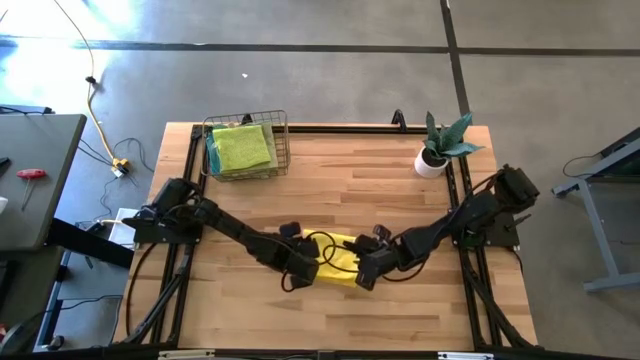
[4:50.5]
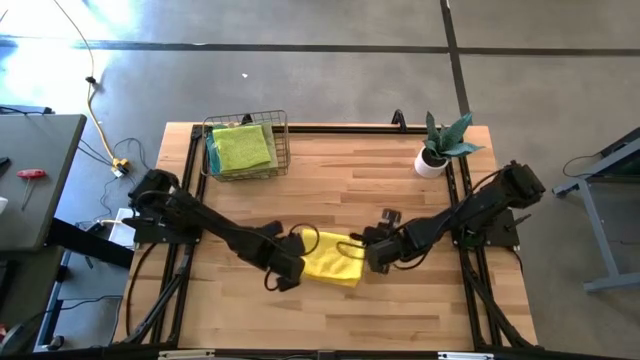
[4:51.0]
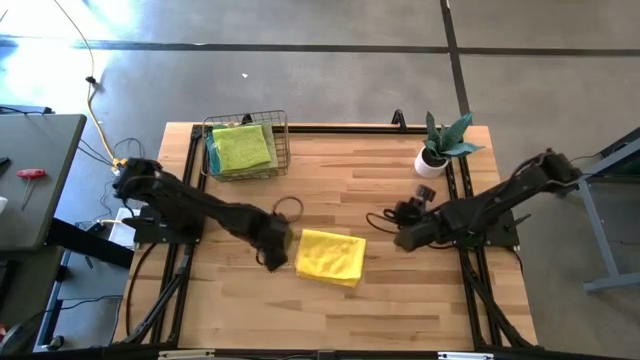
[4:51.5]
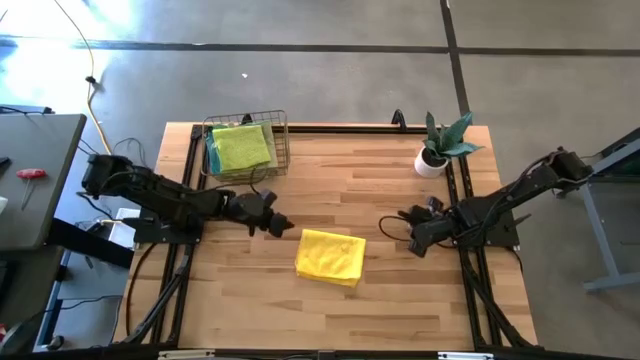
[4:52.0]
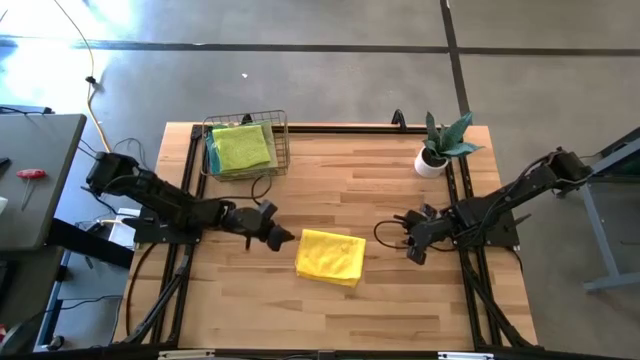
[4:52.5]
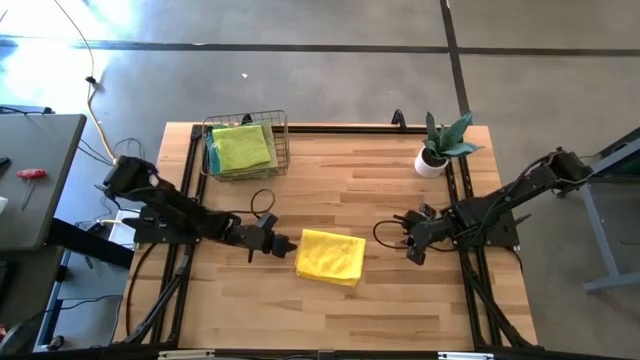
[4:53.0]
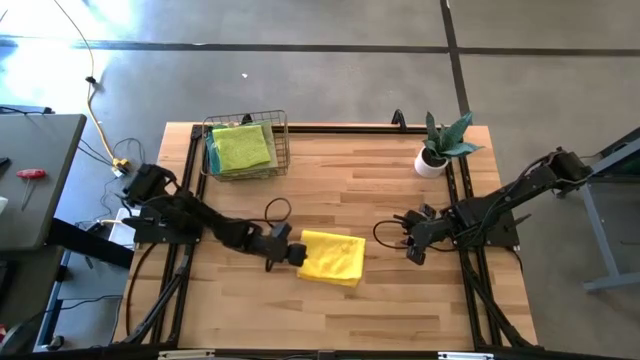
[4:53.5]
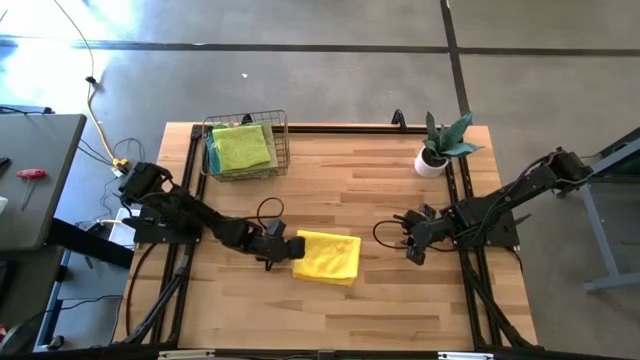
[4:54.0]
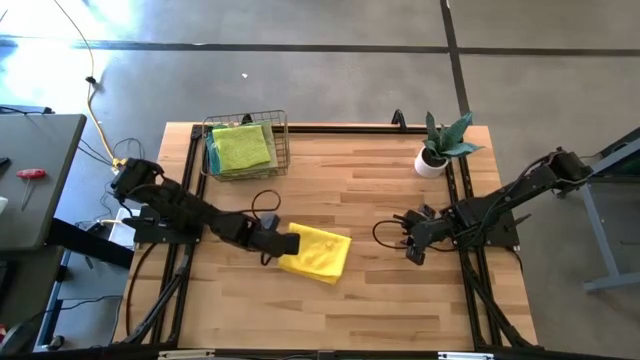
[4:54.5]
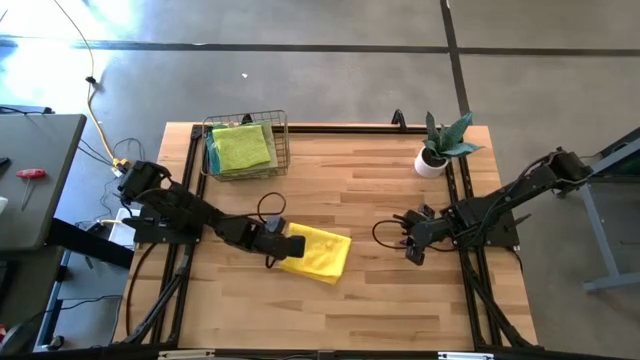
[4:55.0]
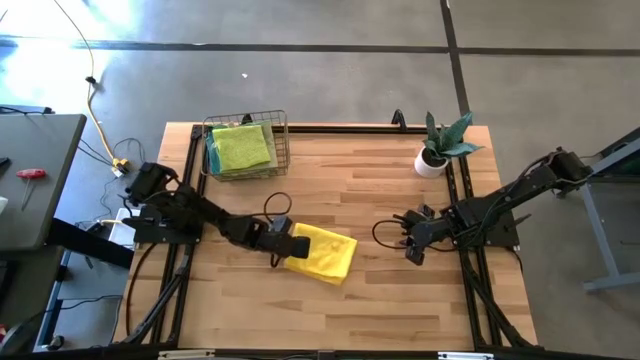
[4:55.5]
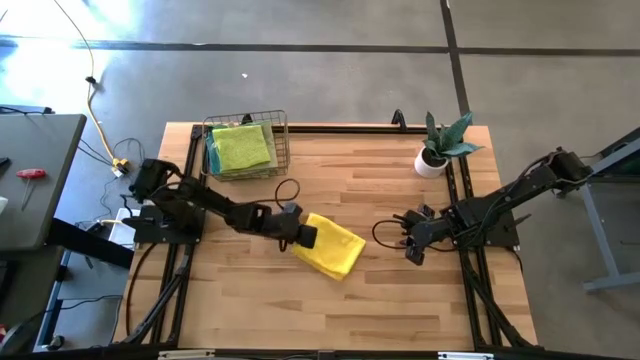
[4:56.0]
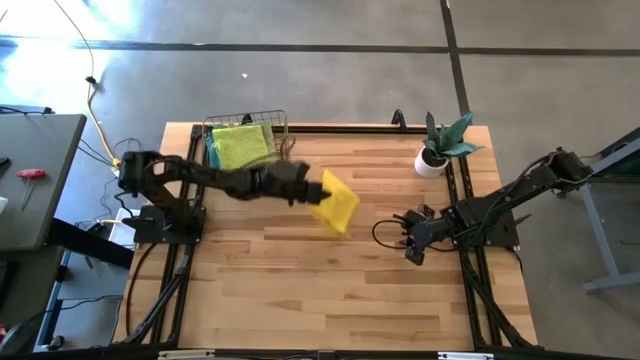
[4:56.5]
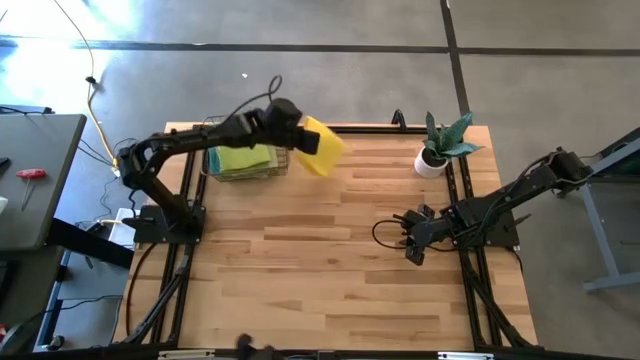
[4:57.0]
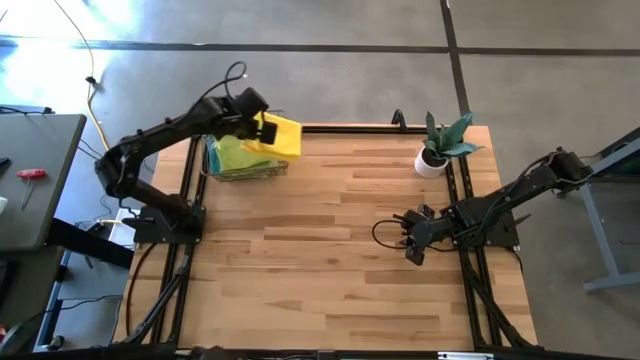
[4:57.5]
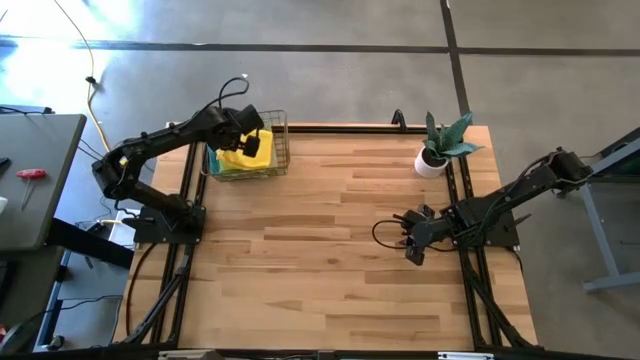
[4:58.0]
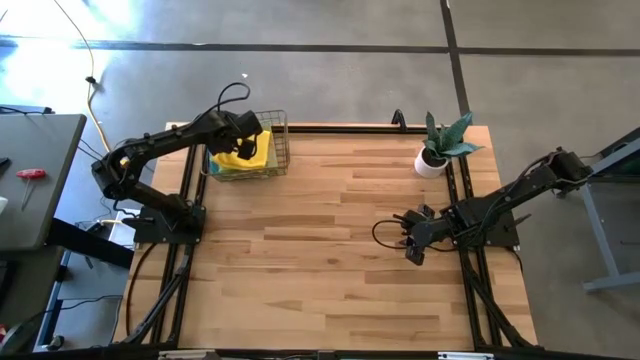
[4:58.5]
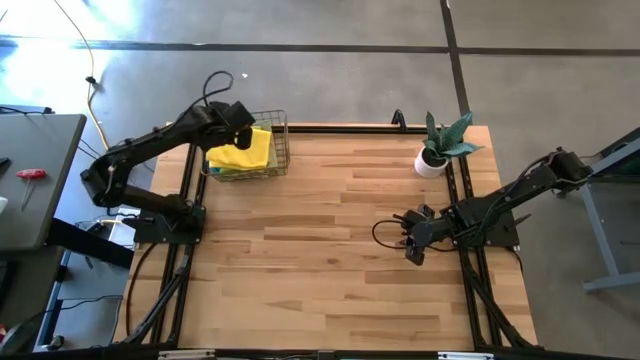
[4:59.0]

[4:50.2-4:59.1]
Task: Fold microfiber towels
Put the folded yellow towel into the wire basket

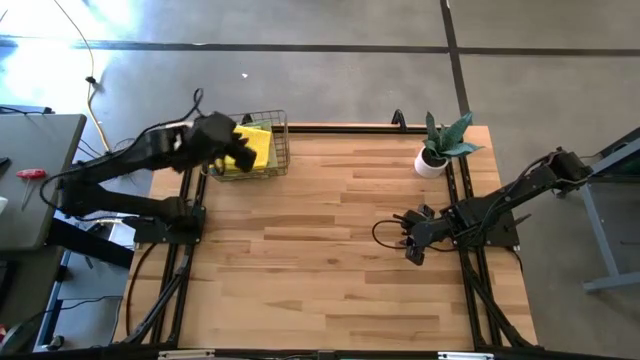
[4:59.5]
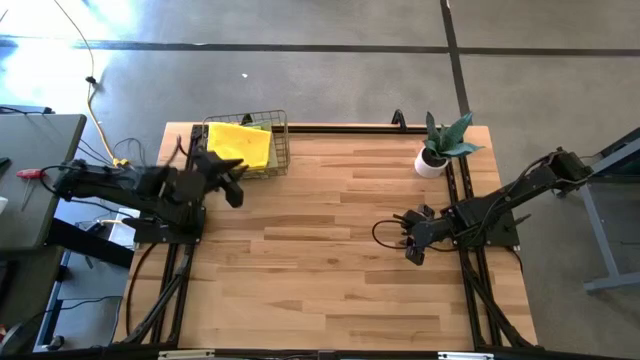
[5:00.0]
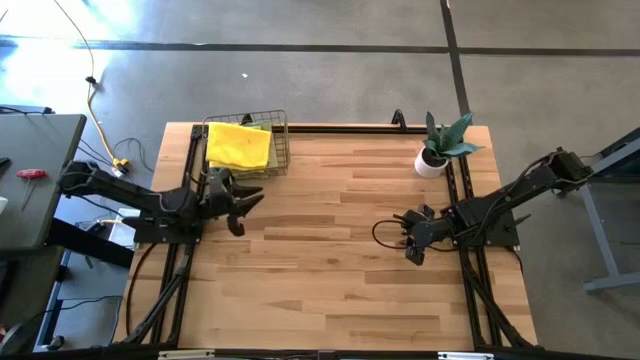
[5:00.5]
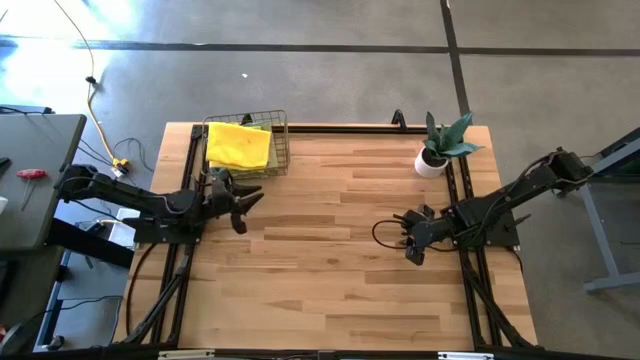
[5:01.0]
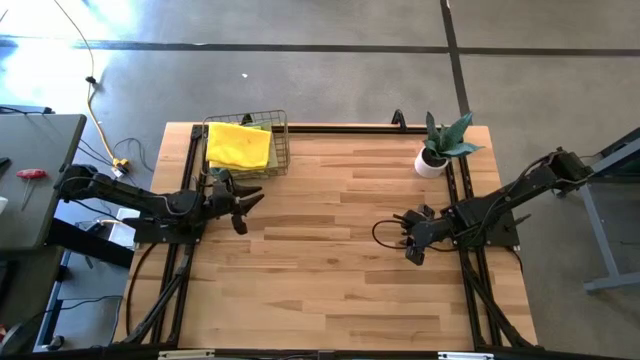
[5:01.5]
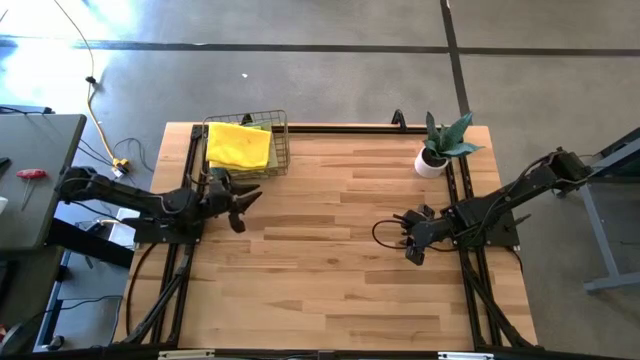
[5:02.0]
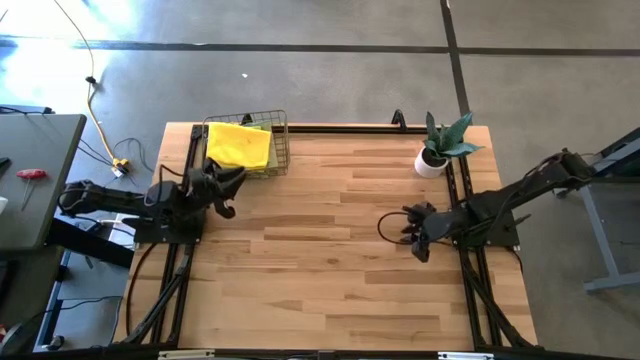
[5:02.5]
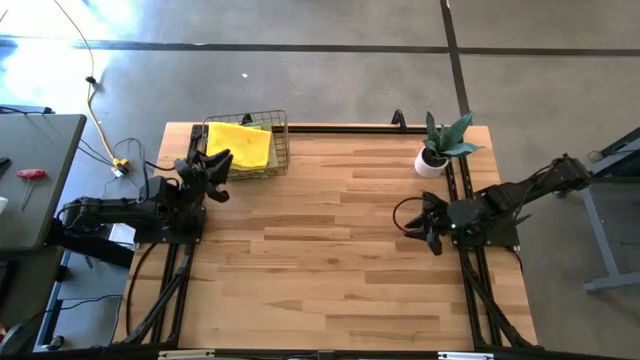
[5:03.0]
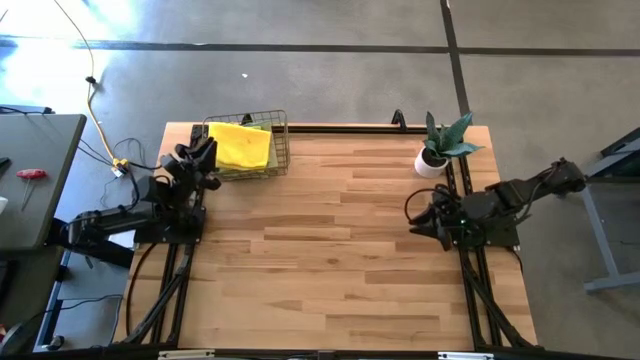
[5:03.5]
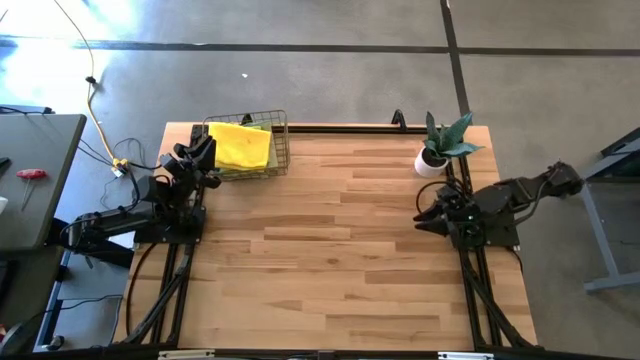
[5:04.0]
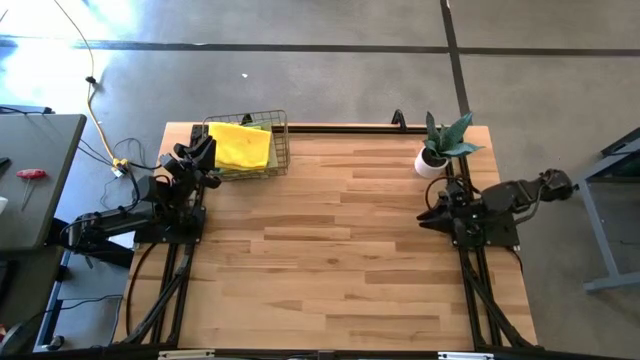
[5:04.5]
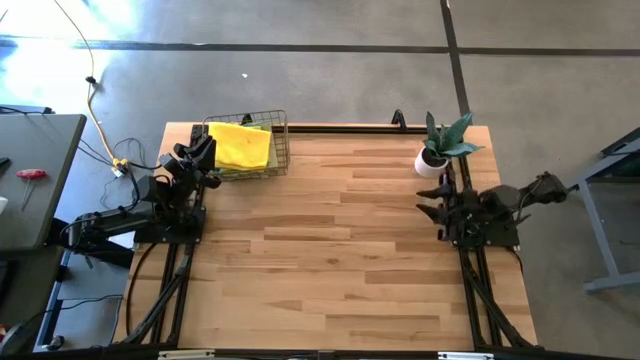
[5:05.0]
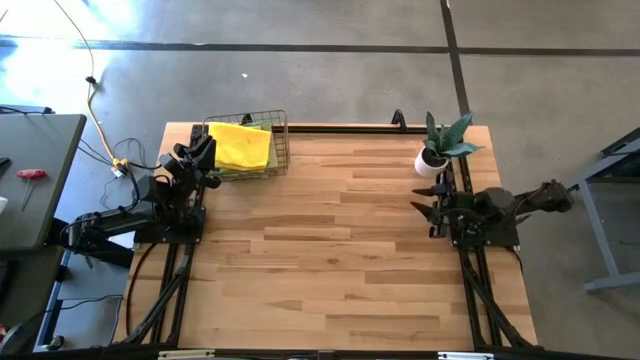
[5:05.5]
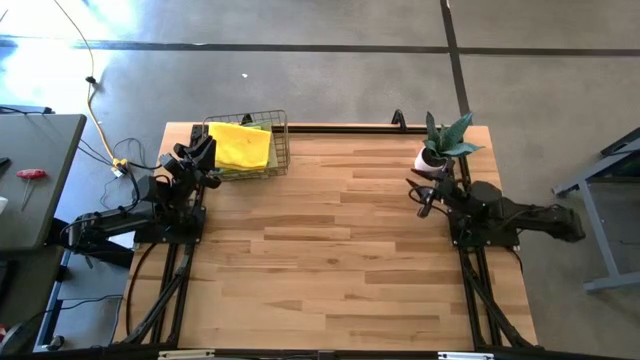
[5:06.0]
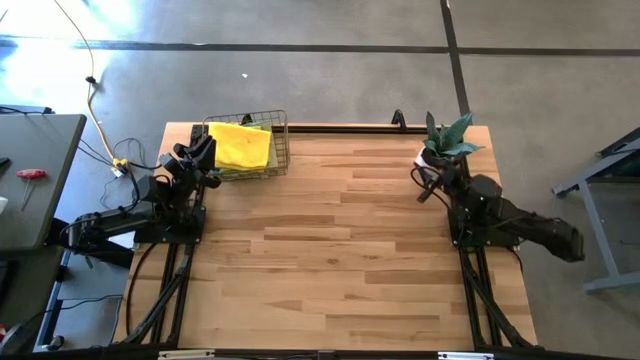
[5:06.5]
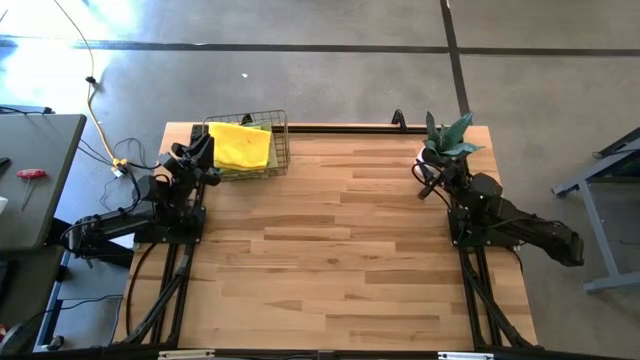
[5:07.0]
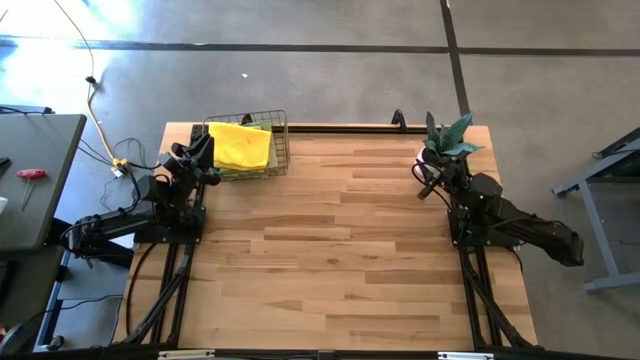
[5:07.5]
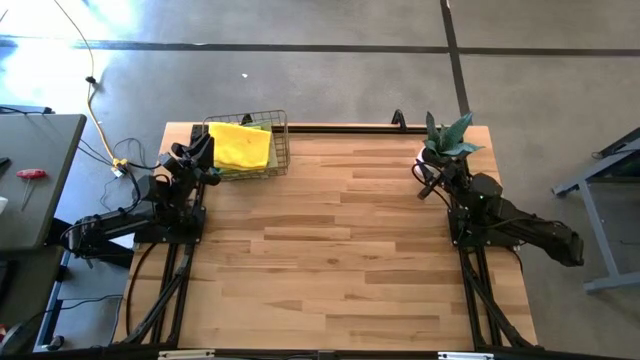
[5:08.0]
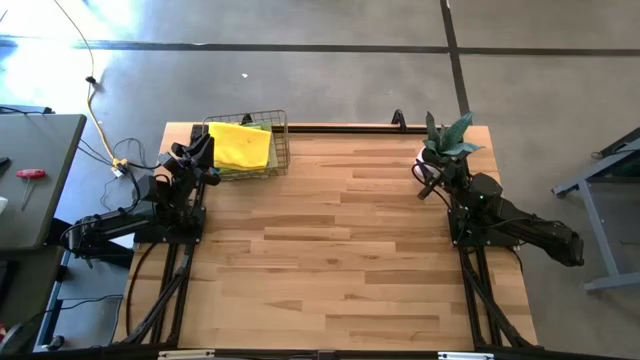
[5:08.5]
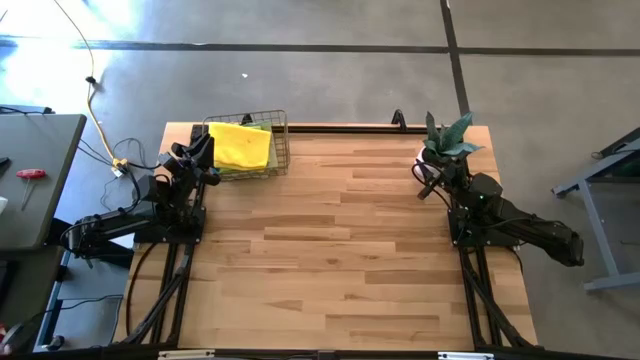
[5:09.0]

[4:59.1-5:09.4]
Return to Home Position

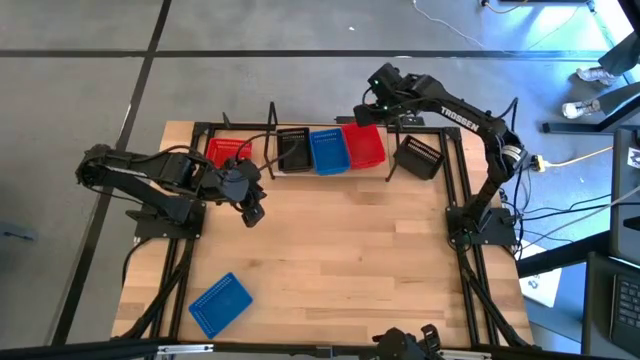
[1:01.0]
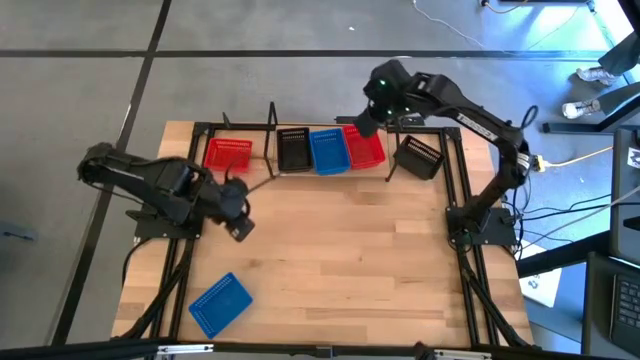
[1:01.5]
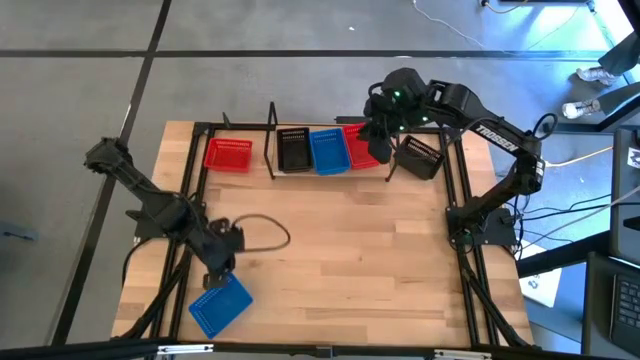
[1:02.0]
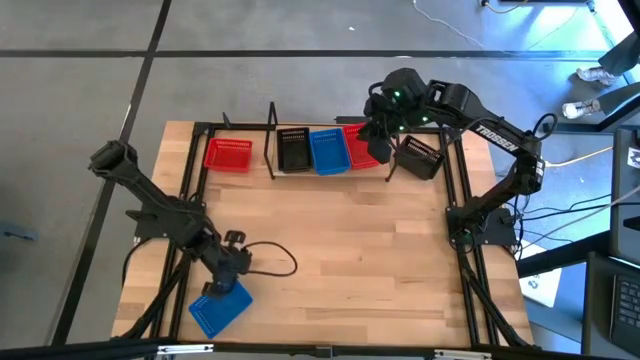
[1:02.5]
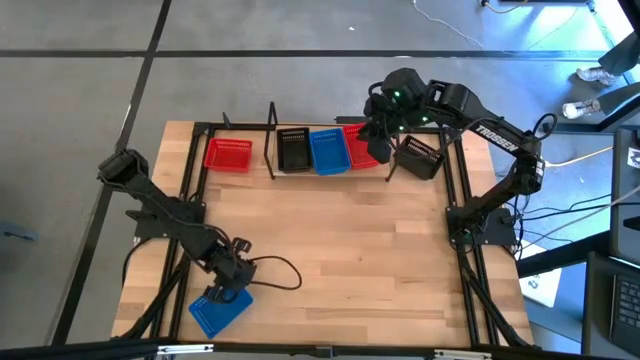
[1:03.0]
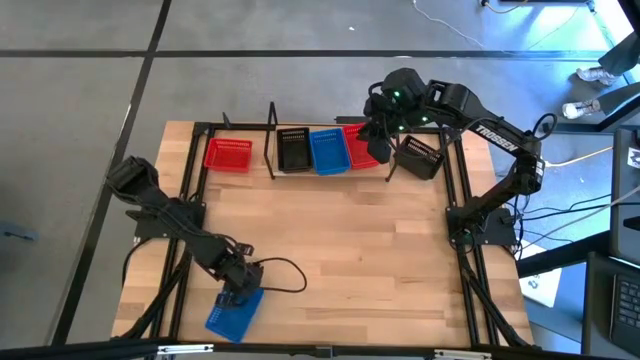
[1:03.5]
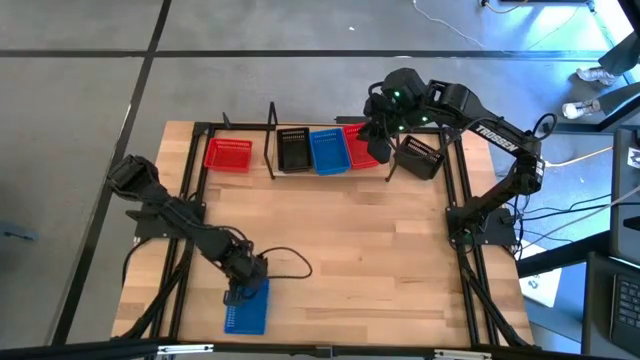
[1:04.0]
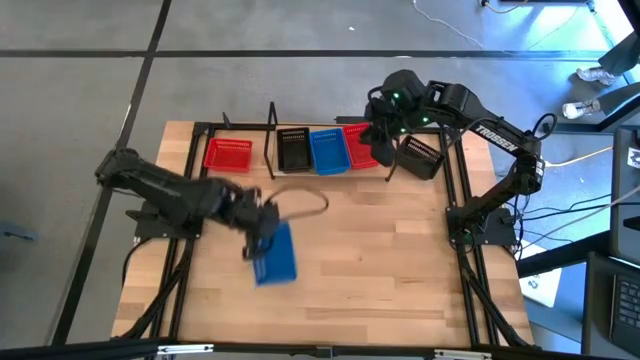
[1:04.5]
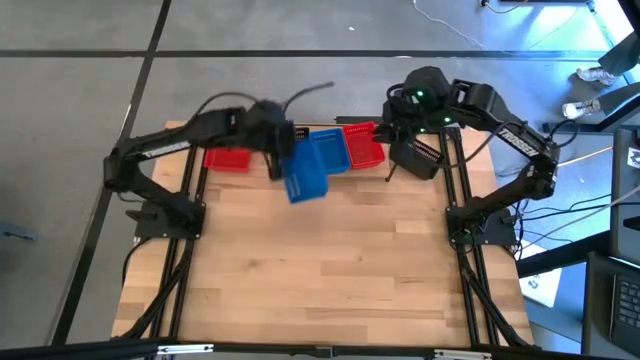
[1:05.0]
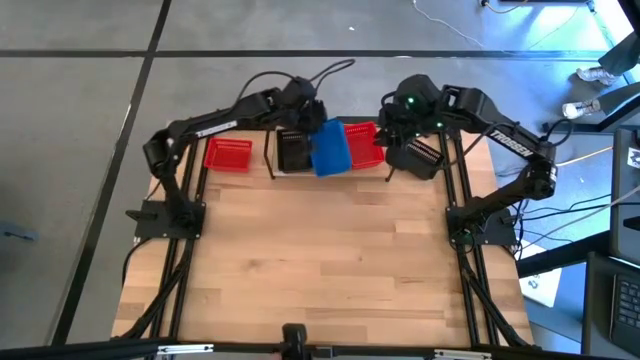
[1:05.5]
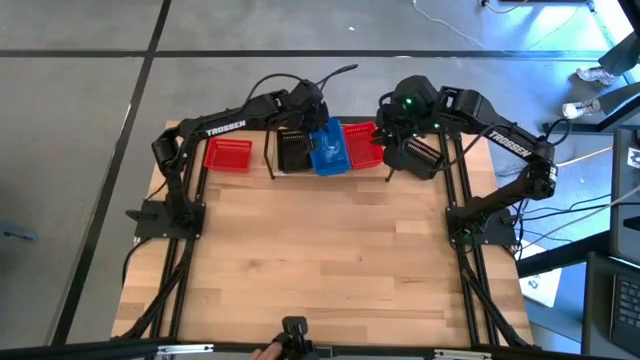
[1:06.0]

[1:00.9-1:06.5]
Task: Stack baskets on shelf by color
Stack the blue bin on top of the blue bin on the shelf
